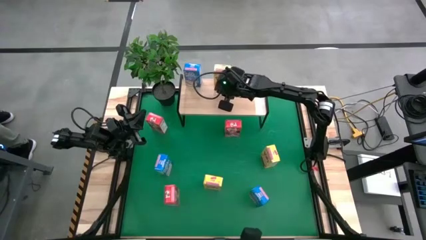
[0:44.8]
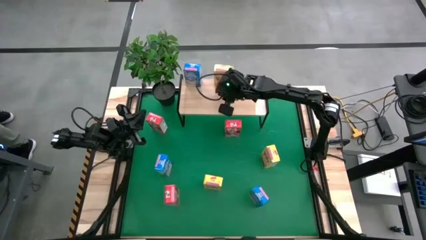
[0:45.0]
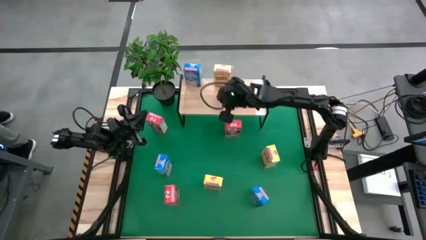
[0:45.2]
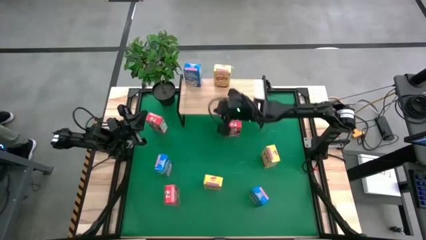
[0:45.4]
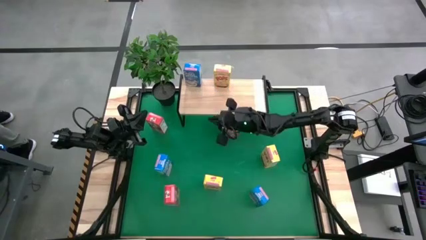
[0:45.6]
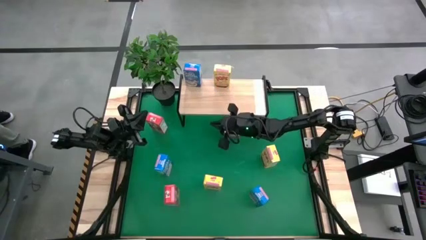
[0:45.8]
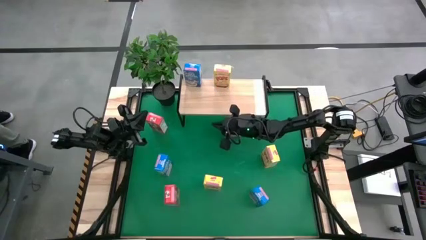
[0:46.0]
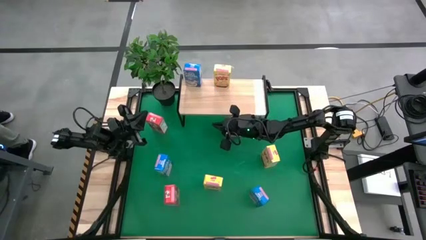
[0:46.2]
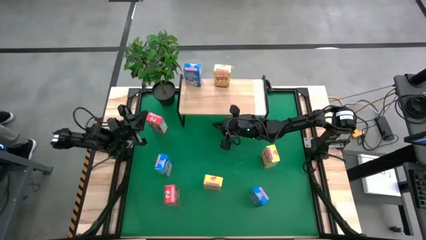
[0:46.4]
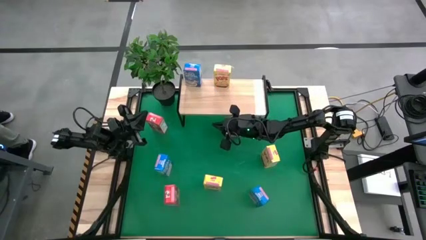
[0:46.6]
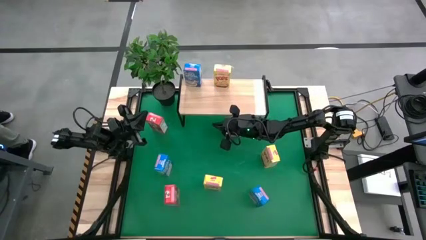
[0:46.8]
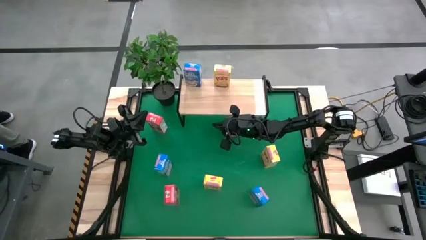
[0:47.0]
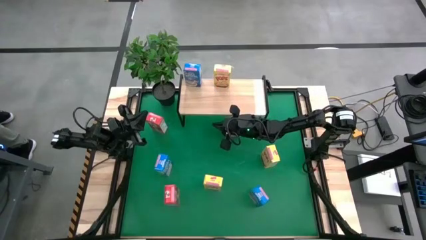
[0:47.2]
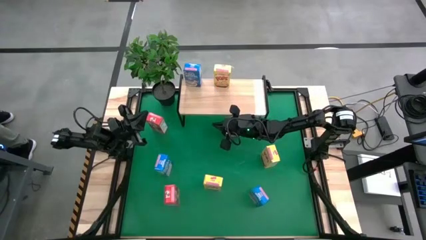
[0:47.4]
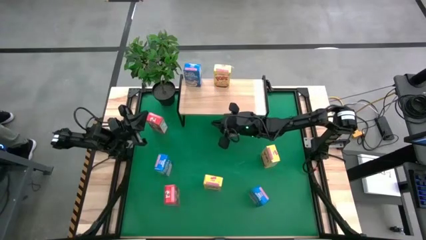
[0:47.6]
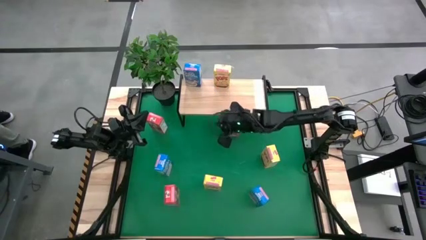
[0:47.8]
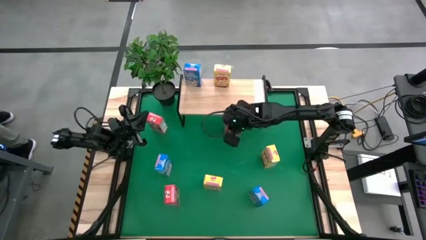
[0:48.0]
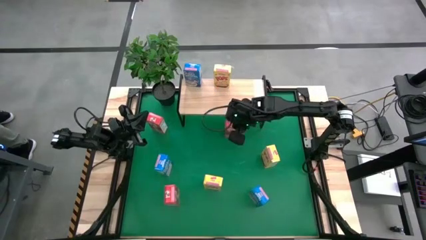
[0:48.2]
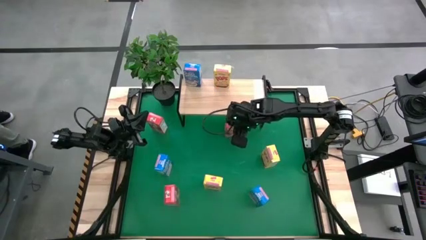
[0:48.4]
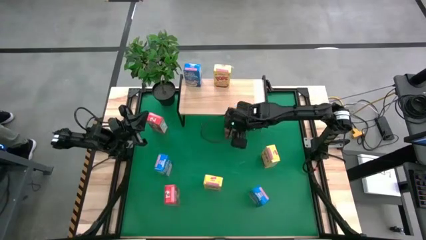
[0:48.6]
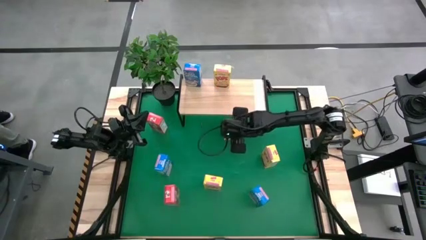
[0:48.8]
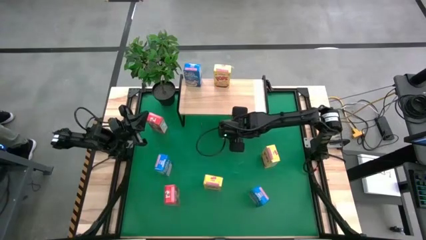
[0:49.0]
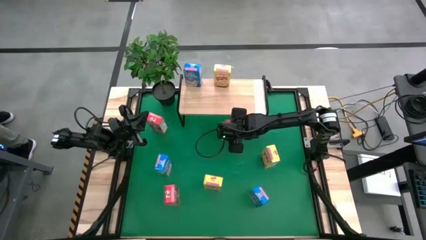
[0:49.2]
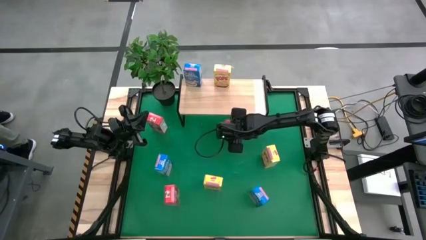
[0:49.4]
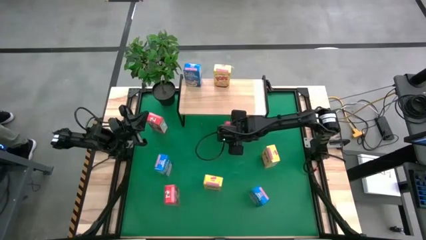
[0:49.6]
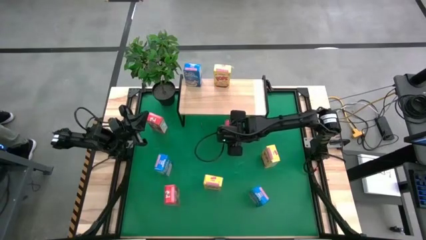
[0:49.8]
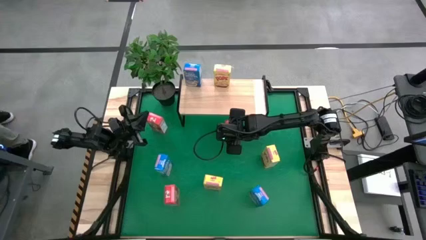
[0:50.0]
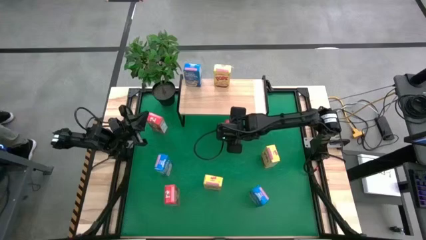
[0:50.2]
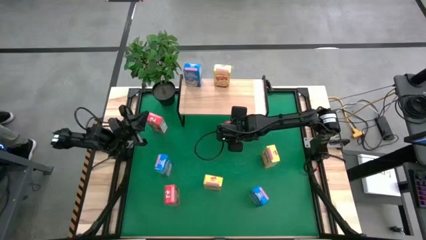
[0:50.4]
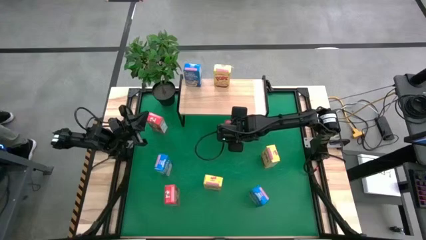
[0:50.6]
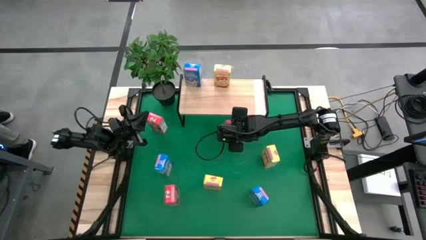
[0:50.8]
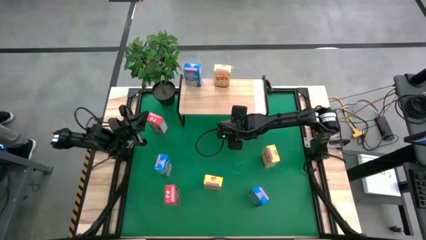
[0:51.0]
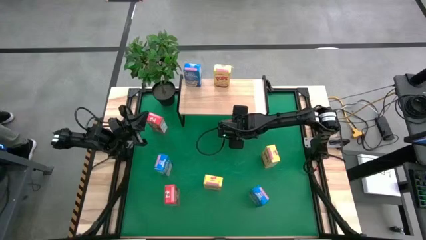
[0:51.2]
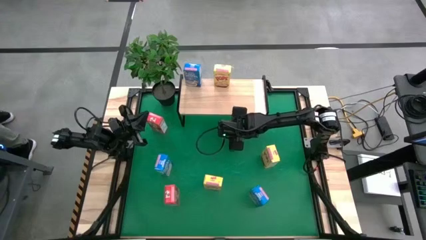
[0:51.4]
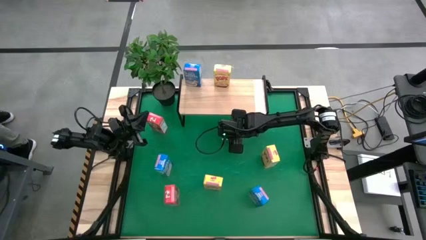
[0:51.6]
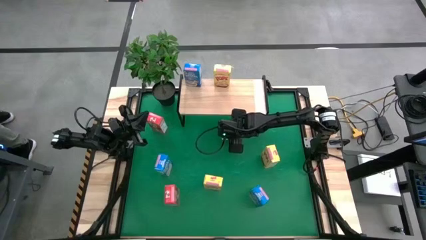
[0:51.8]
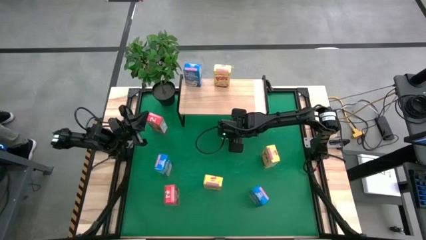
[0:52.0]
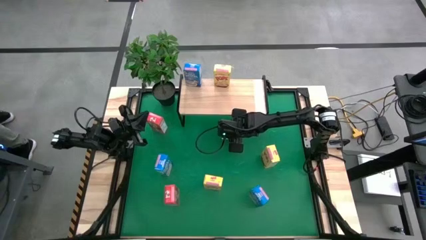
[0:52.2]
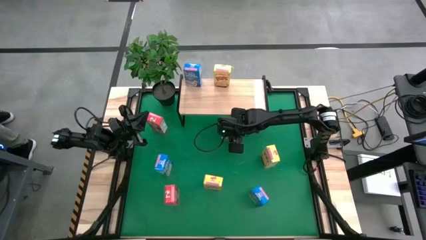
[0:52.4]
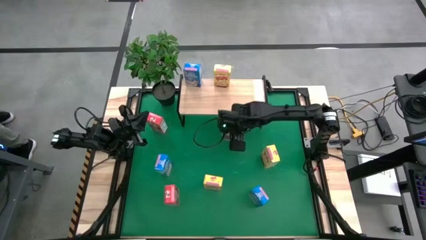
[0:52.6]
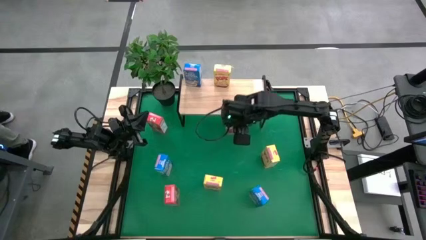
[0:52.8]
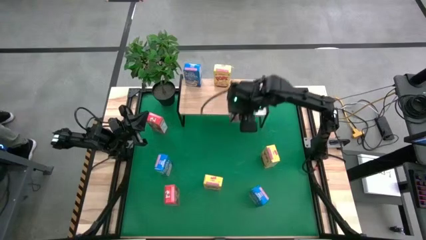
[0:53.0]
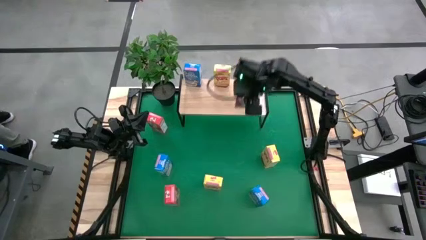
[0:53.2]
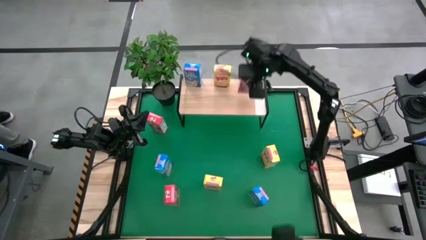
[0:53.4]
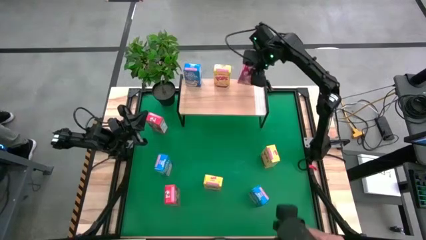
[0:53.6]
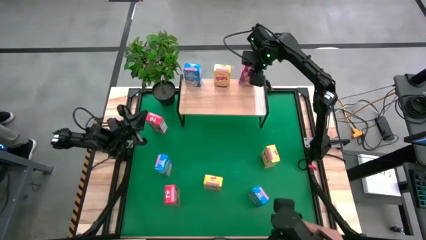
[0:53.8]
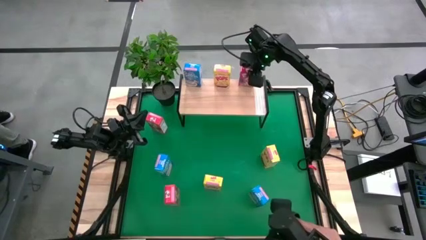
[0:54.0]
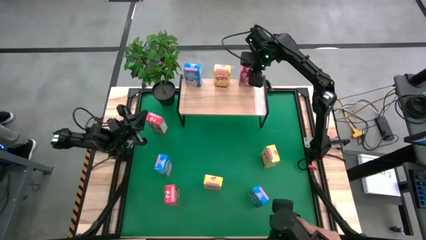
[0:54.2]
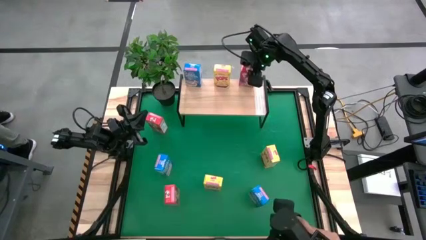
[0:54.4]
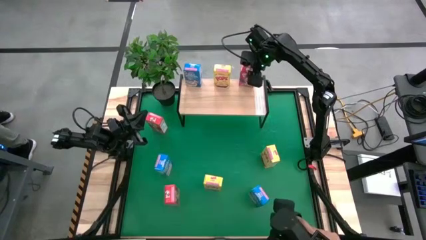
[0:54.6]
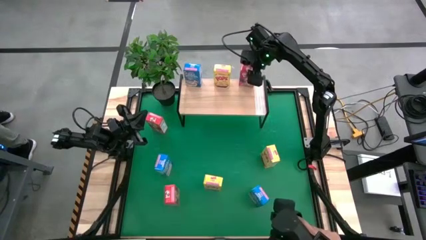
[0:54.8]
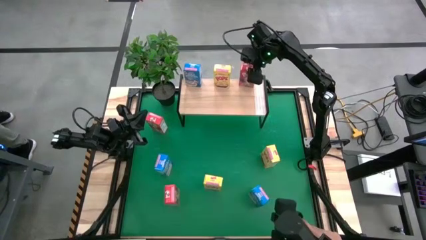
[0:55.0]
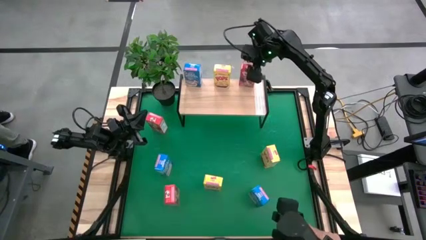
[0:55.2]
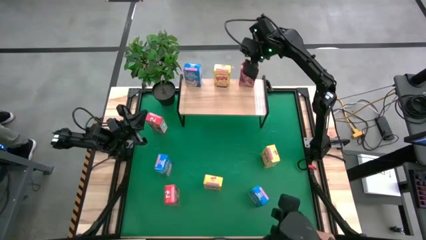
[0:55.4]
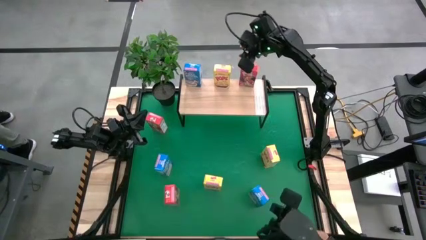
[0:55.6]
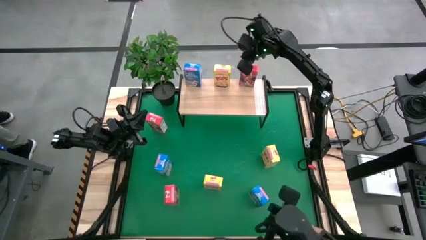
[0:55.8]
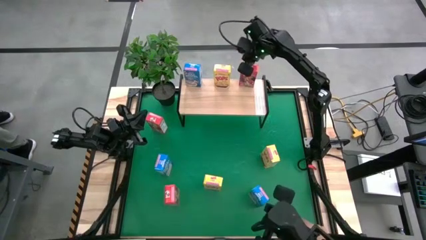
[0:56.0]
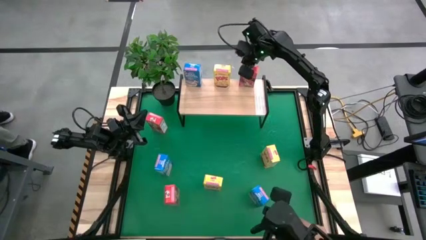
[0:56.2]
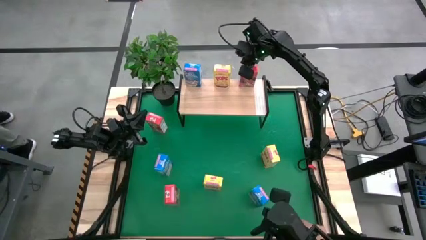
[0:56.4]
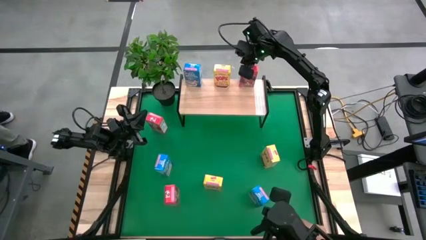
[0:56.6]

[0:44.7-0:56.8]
Task: Stack cereal on shelf
Put the top right red cereal box on the shelf

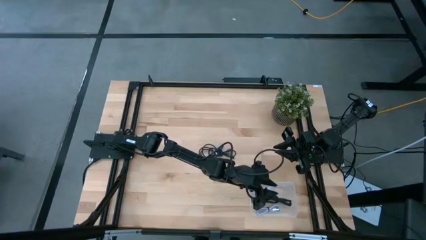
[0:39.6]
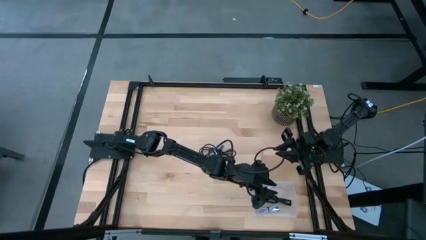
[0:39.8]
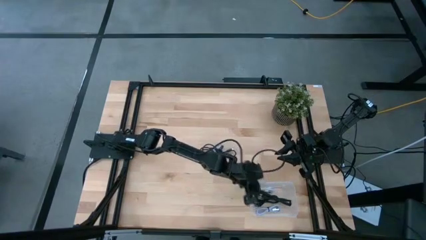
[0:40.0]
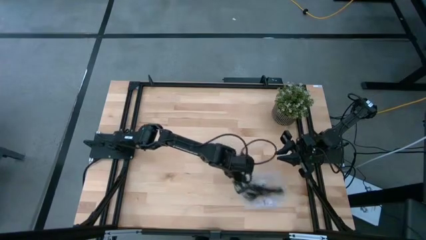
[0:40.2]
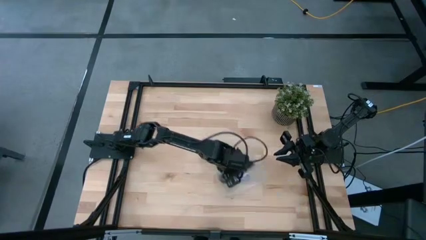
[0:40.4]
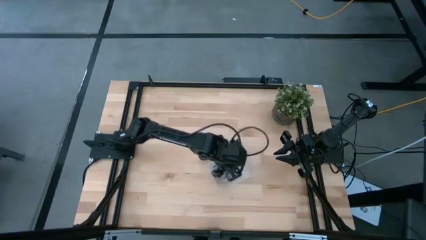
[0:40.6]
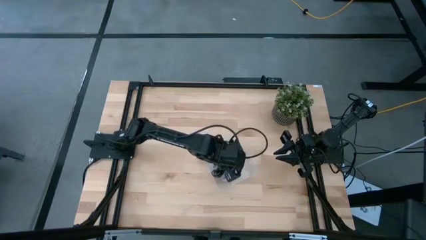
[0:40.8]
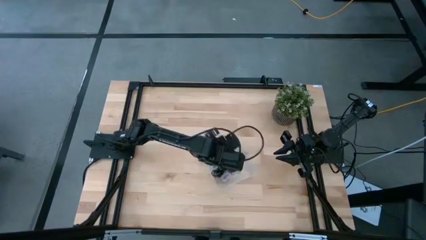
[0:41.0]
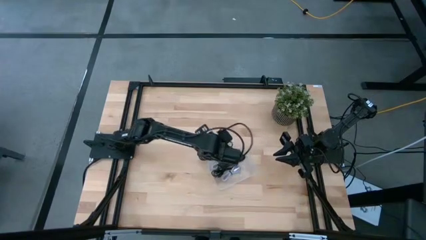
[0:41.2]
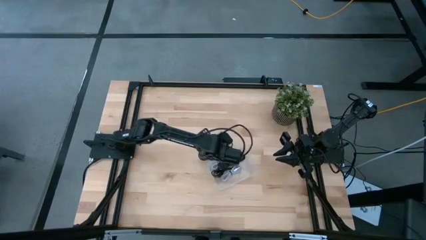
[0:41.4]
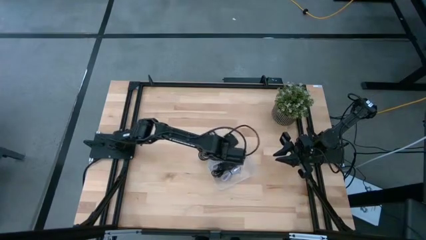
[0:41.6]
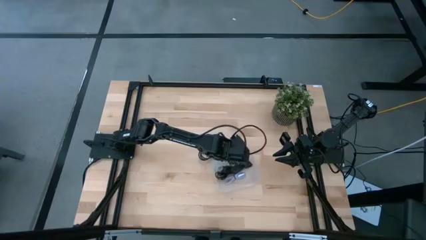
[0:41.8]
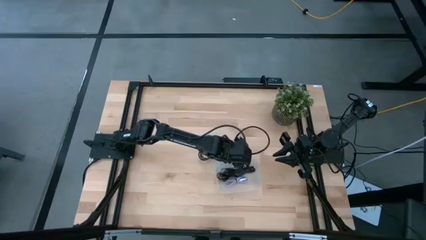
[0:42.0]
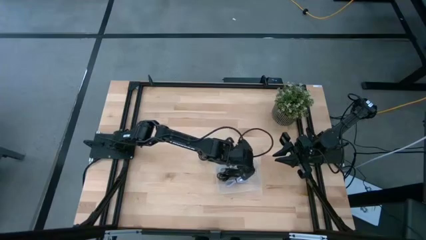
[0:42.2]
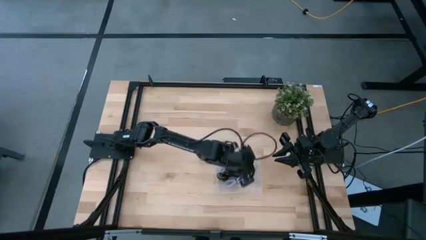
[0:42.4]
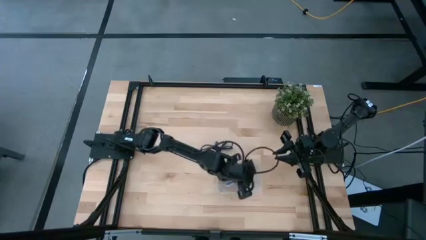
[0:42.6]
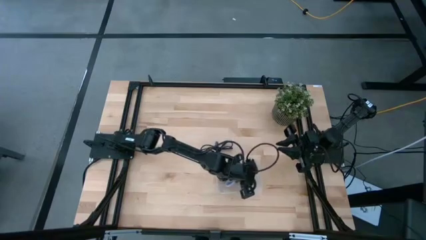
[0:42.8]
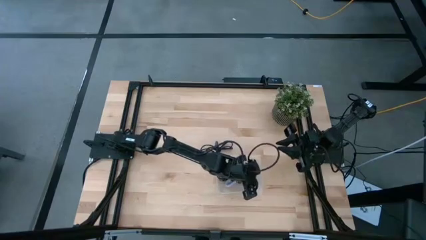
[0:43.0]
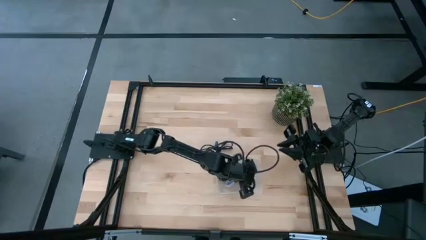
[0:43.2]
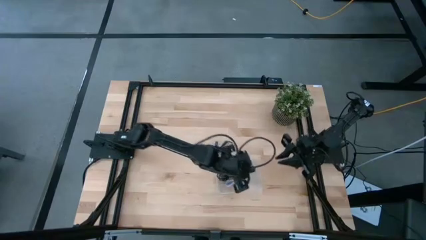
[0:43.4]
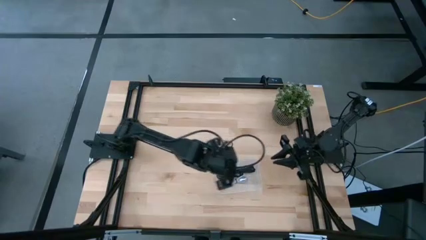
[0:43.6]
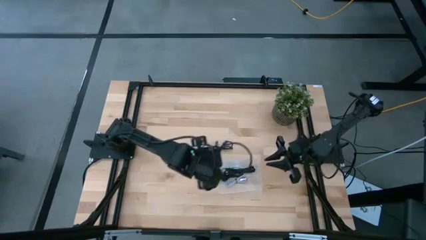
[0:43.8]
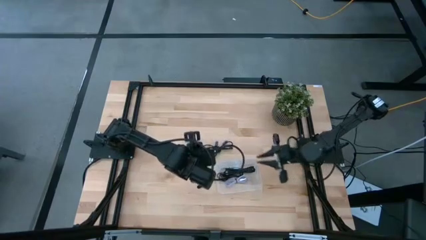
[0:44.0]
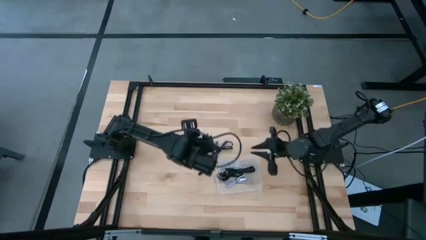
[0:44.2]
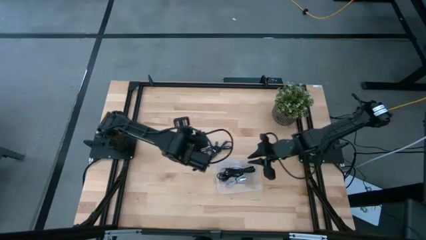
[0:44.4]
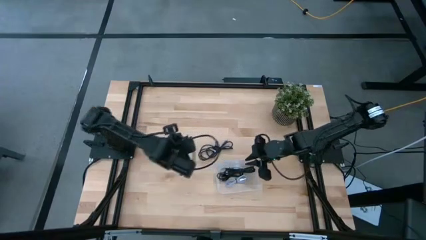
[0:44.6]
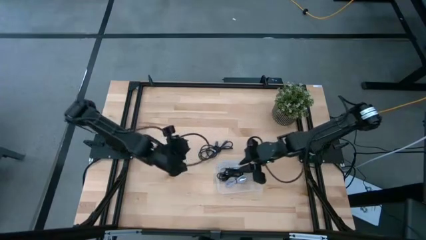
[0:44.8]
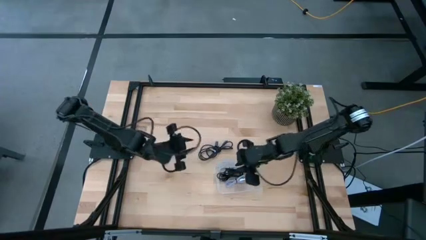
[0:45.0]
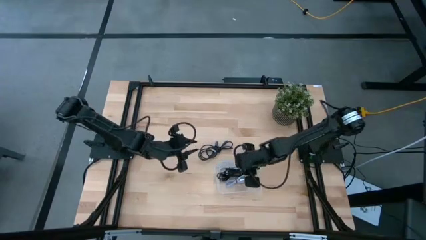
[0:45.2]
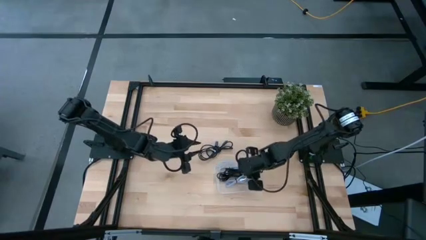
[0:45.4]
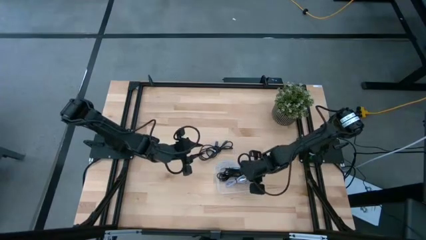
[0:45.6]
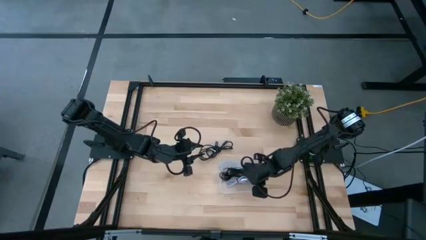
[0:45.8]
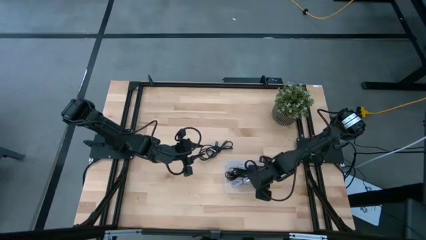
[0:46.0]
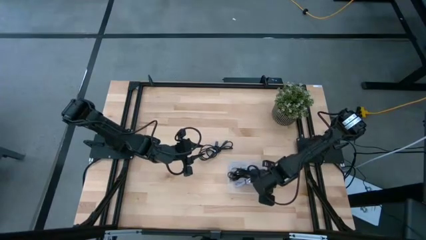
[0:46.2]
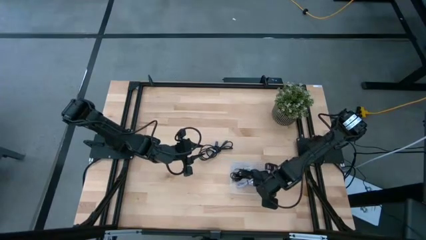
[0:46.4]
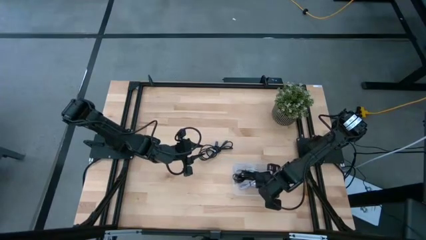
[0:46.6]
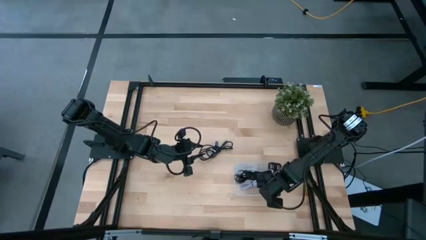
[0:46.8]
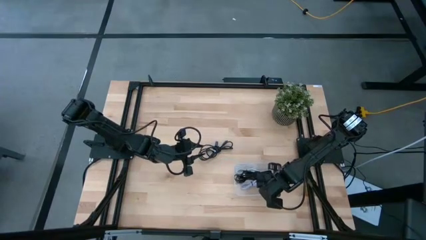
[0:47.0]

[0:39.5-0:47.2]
Task: Pick and place USB-C Cables
Adjust the transparent bin
